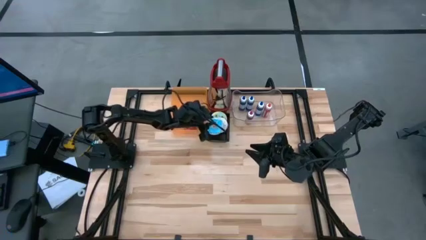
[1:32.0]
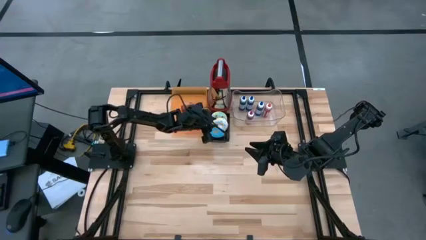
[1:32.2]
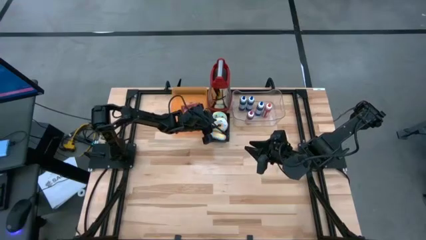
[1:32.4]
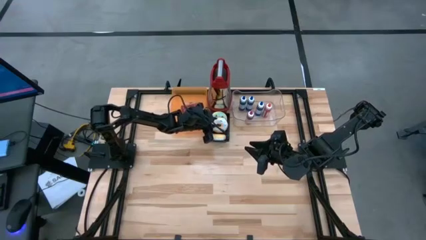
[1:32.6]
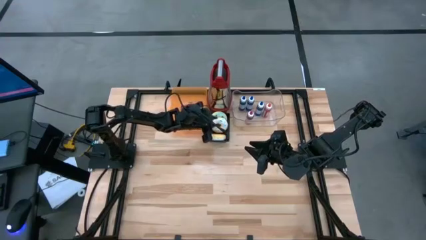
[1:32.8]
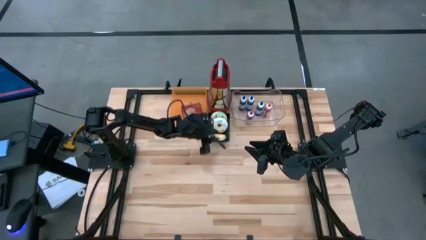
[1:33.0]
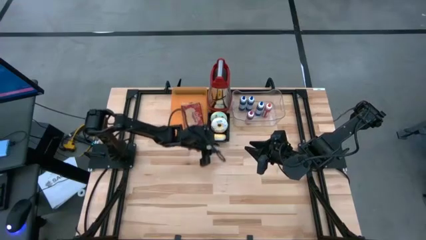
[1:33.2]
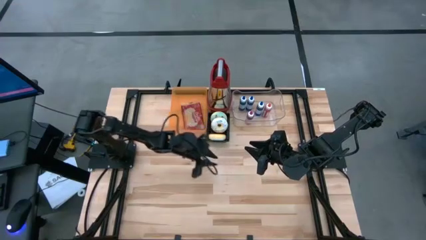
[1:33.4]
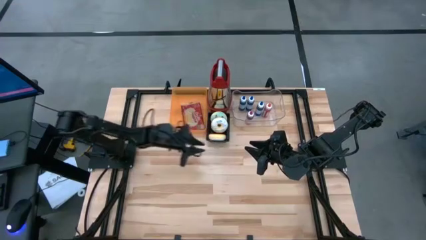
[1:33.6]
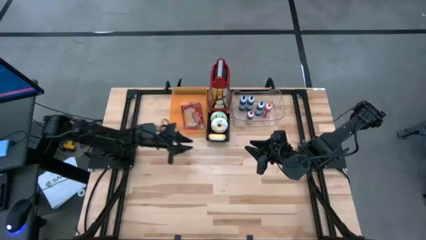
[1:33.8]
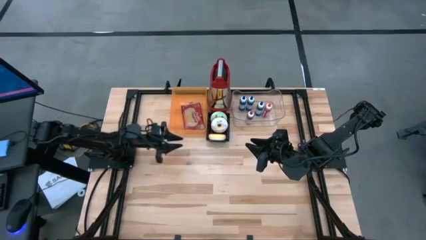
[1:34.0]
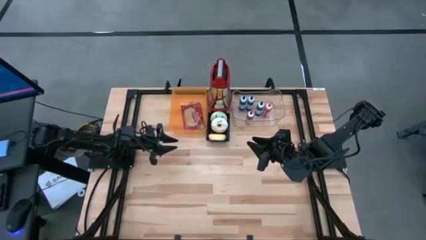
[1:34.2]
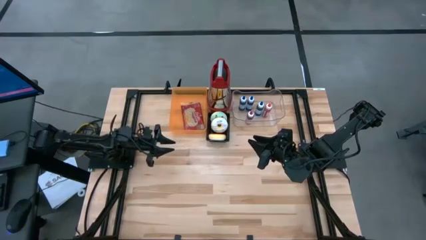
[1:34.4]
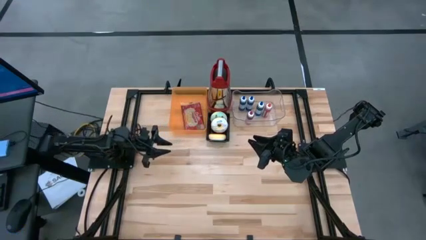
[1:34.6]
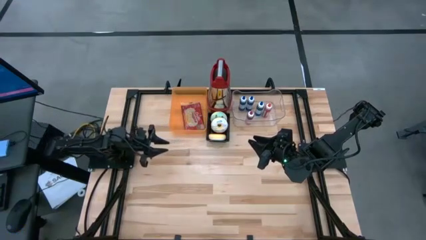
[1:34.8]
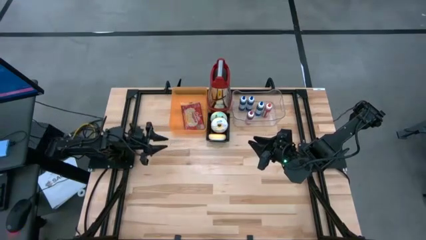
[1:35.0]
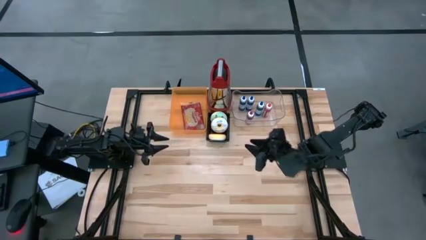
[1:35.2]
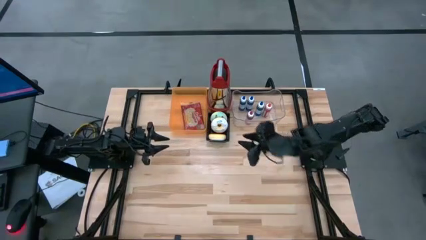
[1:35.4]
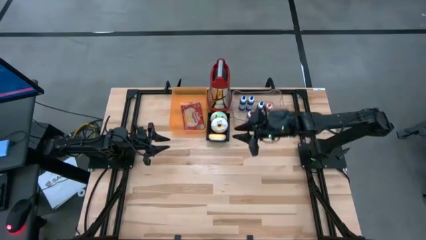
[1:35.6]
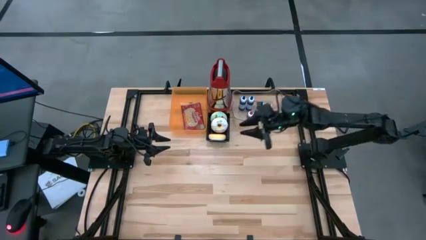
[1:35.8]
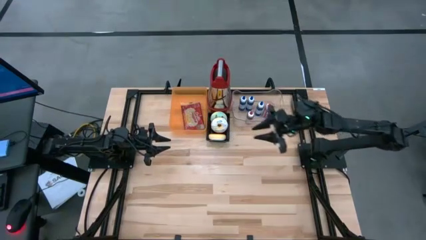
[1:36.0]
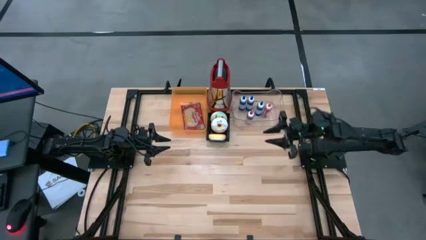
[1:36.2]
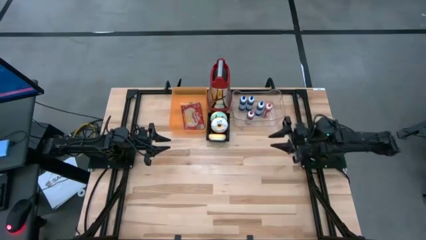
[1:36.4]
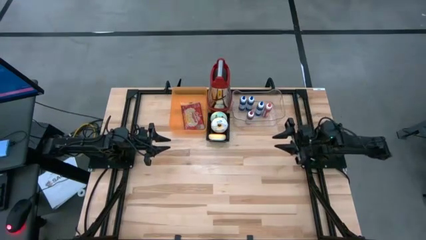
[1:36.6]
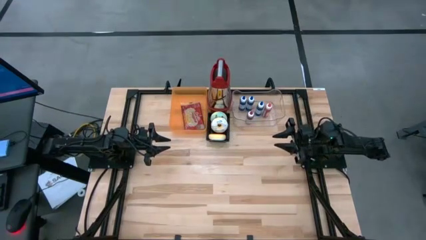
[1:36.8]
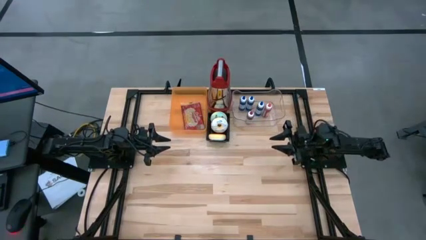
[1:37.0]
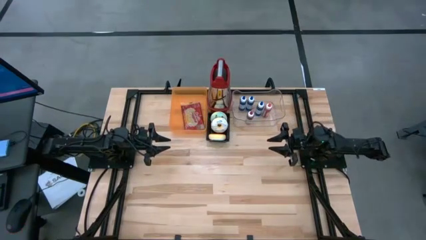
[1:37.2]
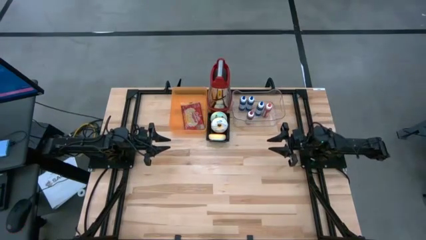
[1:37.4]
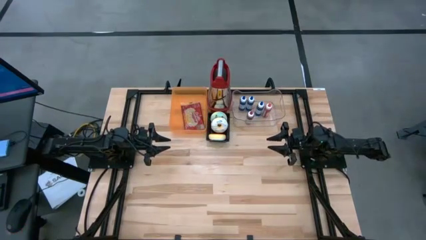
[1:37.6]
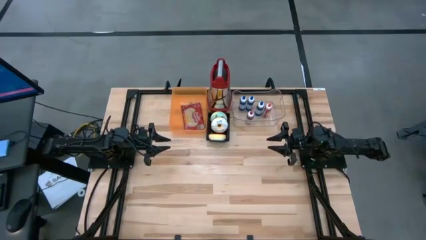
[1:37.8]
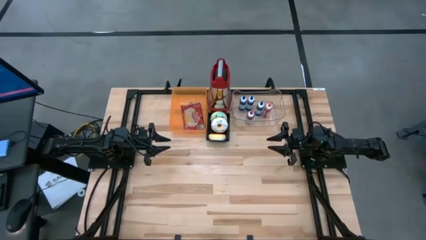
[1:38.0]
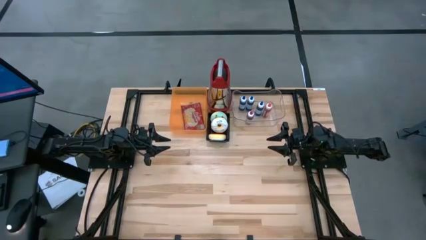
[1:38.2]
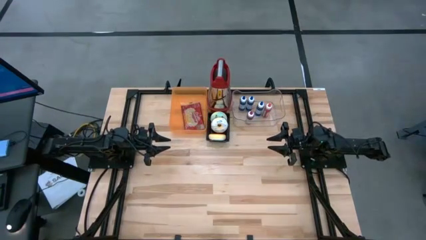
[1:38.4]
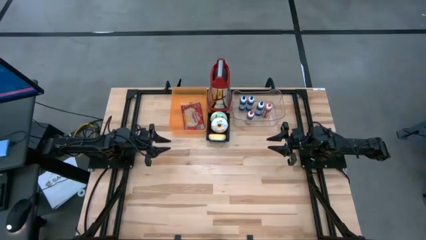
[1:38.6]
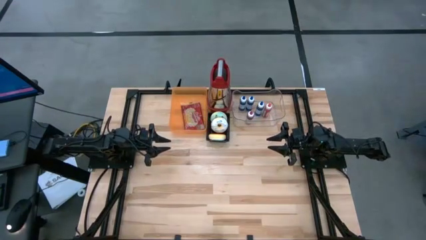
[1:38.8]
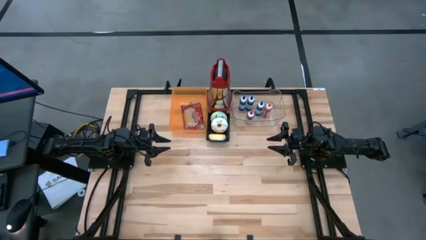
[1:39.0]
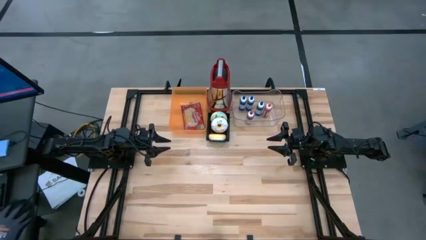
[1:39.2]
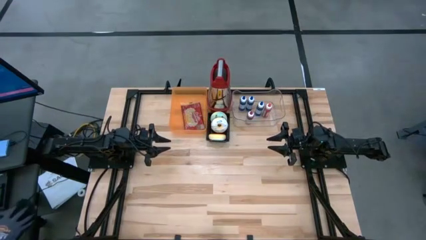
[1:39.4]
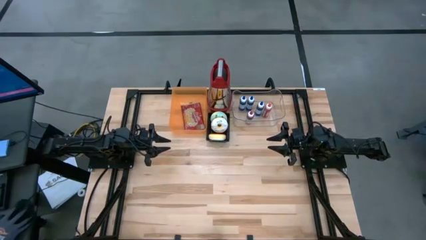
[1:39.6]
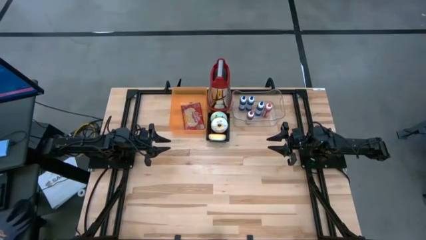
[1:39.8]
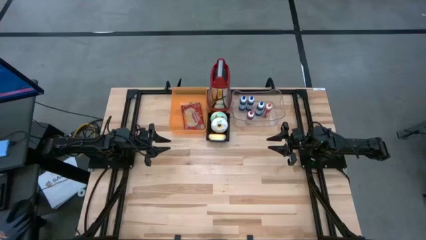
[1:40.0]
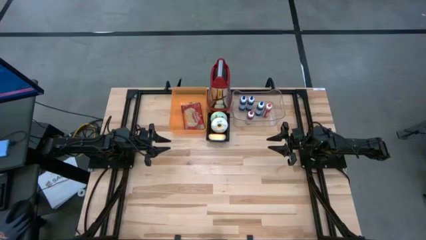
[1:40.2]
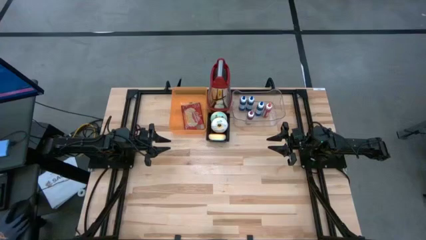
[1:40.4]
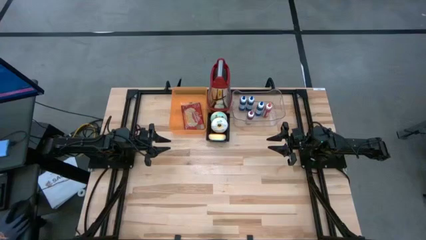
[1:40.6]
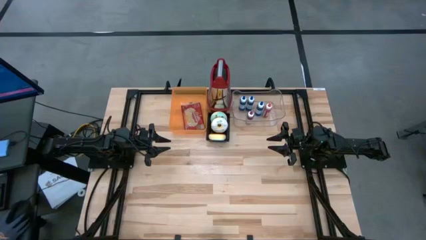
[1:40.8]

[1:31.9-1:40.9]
Return to Home Position

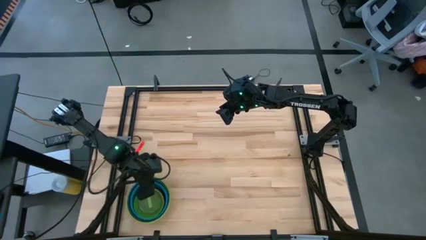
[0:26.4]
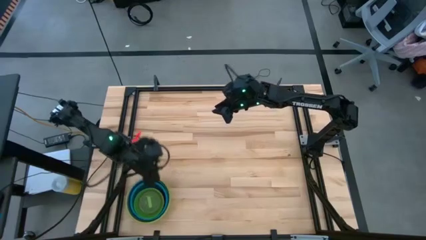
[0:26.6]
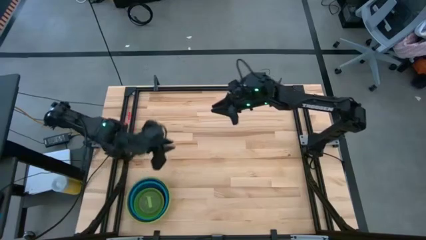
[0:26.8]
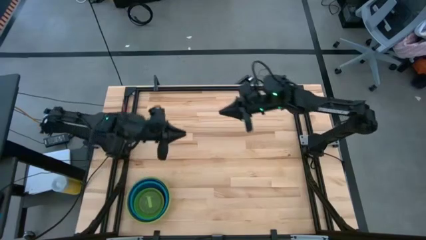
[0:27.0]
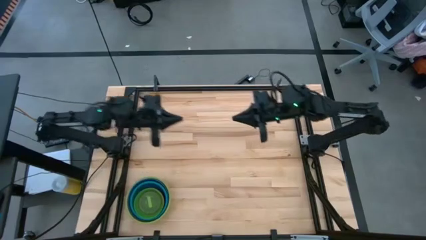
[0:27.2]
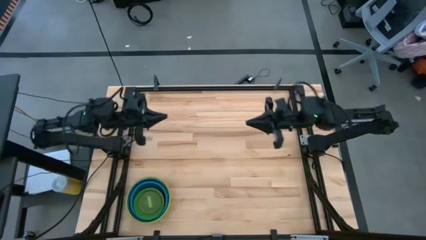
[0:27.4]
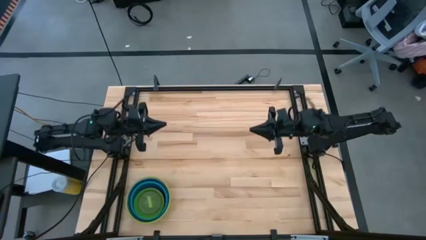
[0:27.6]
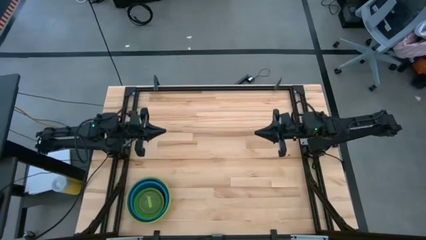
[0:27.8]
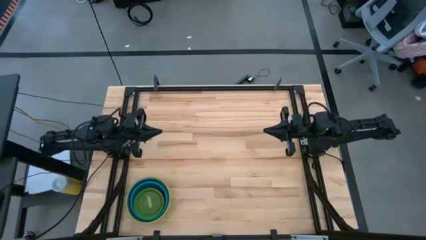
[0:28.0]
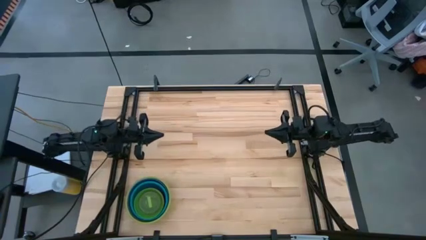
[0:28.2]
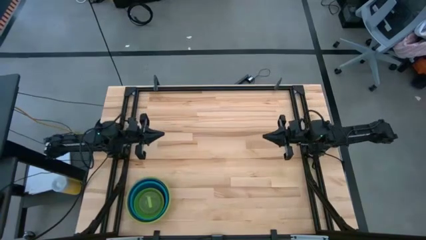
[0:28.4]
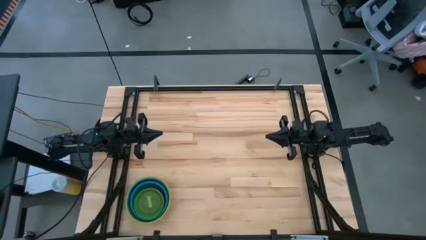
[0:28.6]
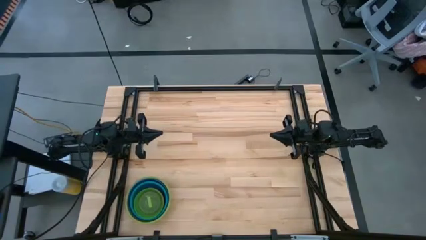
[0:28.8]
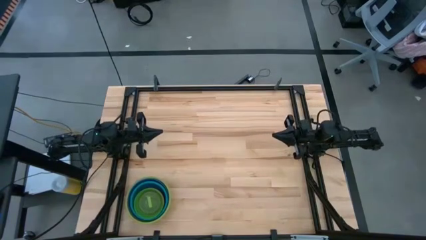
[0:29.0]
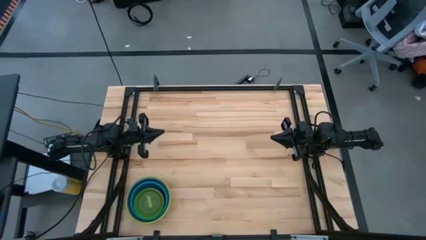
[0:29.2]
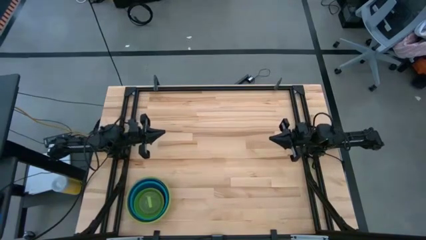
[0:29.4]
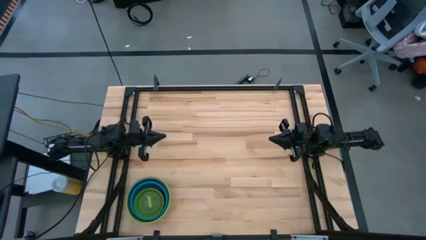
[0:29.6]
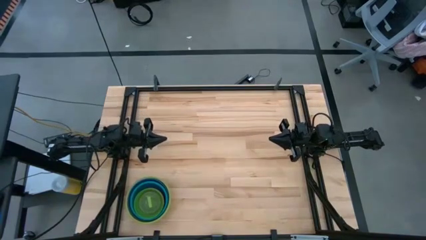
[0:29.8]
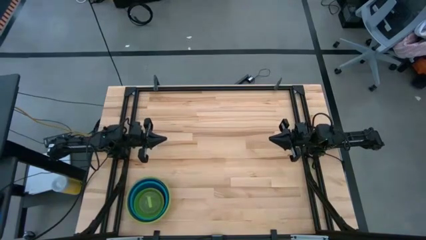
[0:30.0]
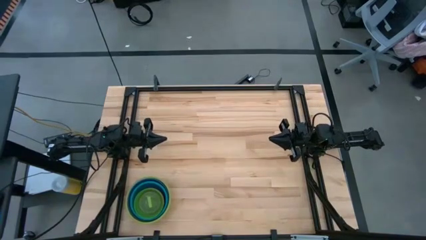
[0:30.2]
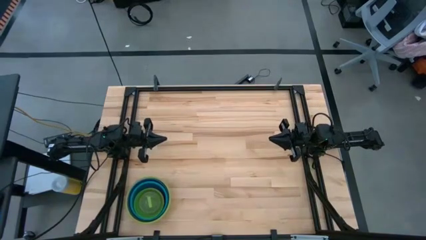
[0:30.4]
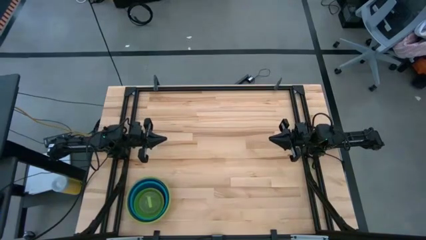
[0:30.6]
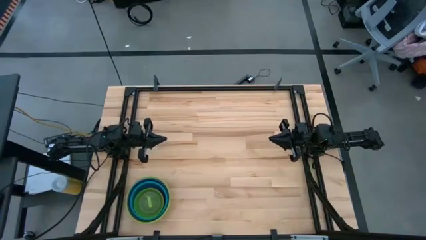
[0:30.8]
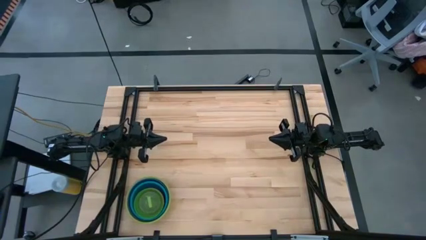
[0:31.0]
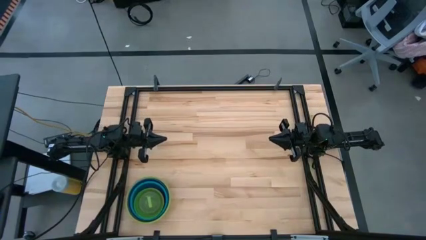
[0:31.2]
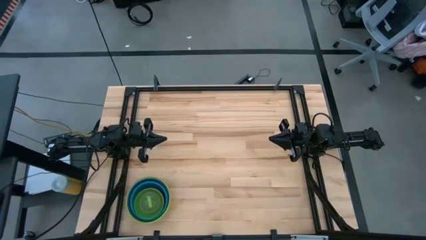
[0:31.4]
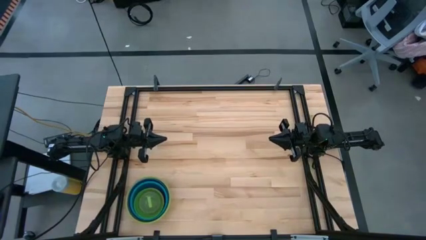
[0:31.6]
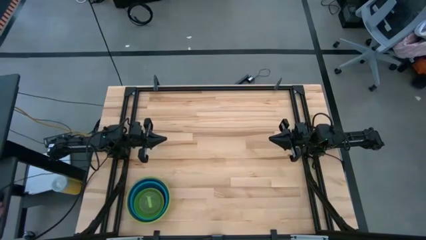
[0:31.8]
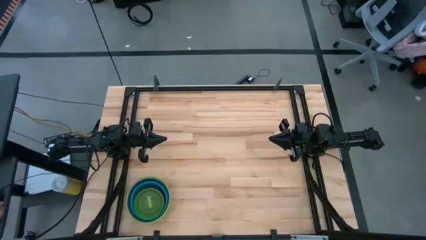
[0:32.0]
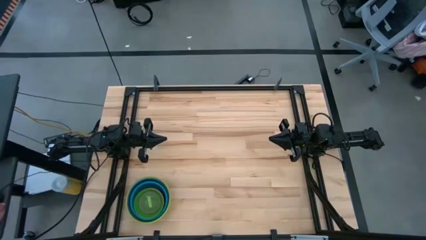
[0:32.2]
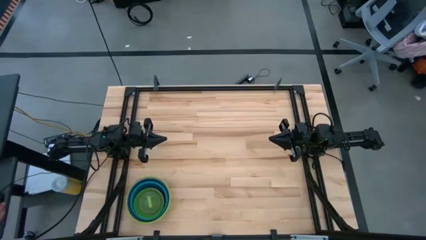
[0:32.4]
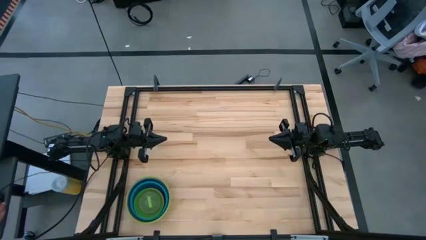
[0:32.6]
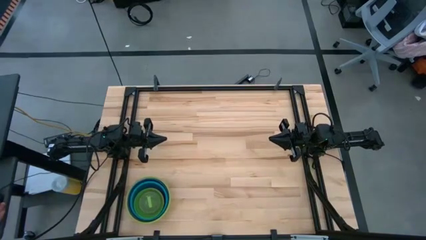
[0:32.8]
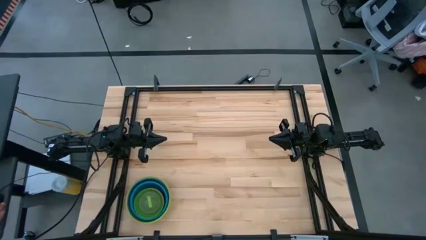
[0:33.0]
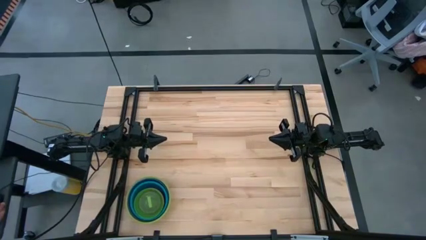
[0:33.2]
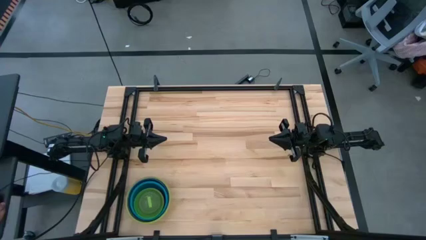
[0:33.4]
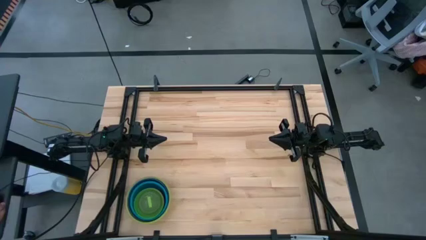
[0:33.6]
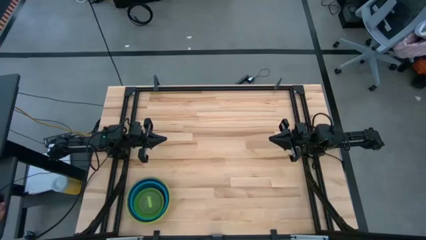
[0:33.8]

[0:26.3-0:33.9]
Return to Home Position
